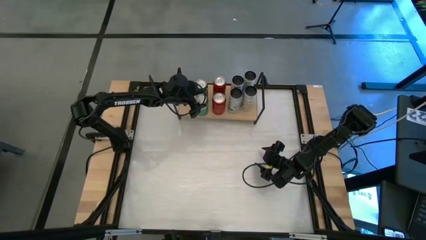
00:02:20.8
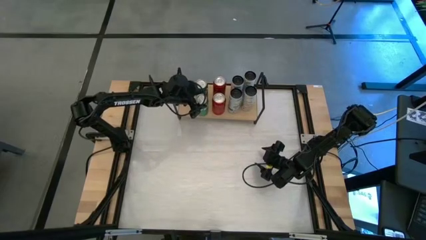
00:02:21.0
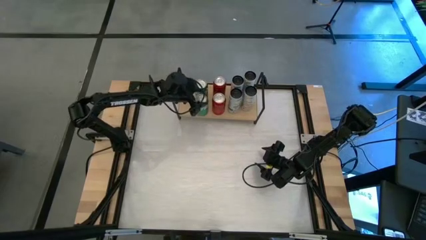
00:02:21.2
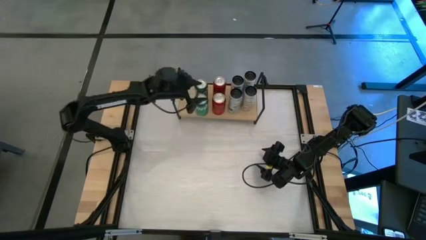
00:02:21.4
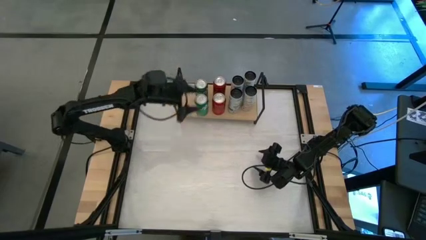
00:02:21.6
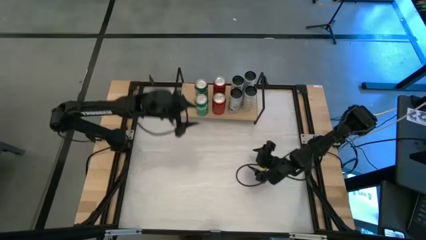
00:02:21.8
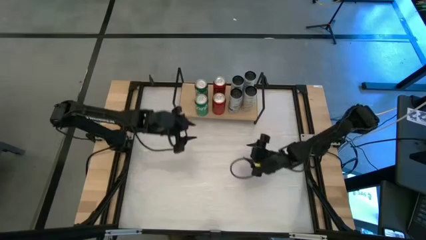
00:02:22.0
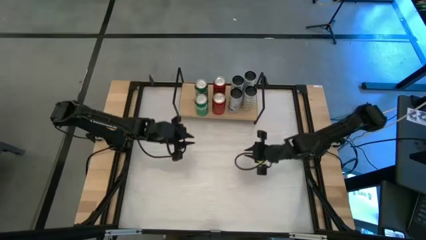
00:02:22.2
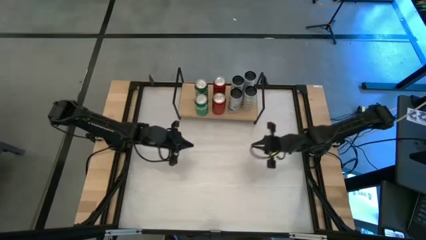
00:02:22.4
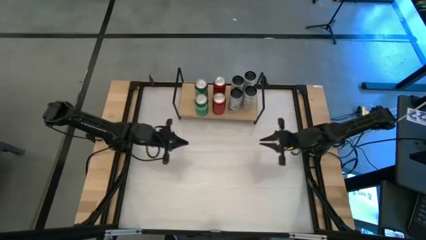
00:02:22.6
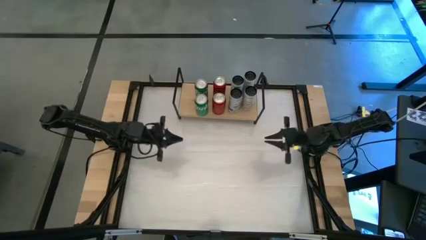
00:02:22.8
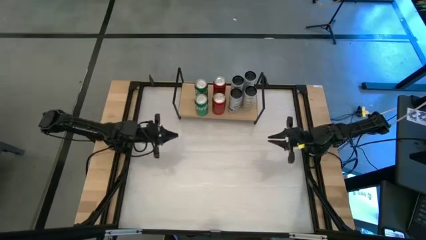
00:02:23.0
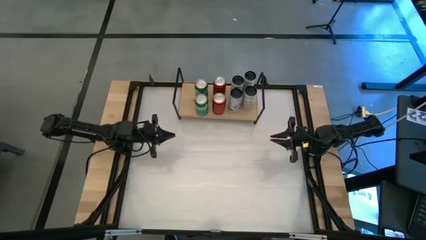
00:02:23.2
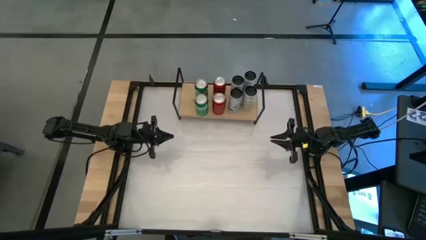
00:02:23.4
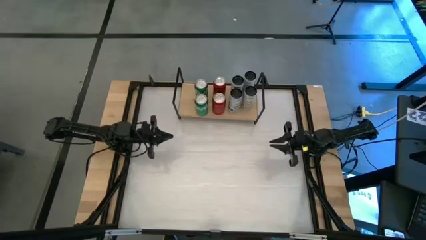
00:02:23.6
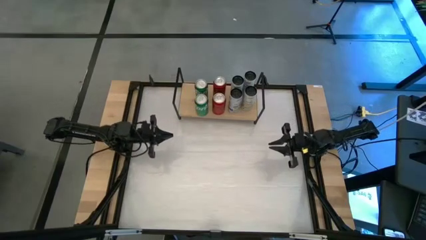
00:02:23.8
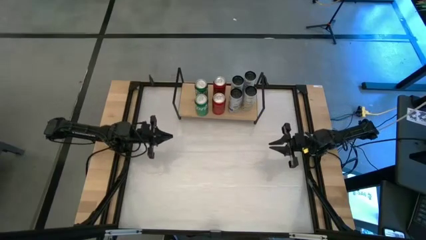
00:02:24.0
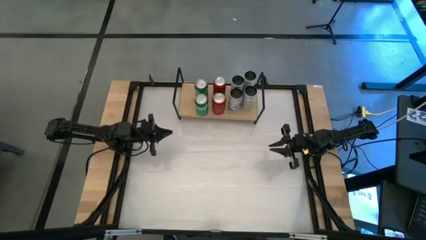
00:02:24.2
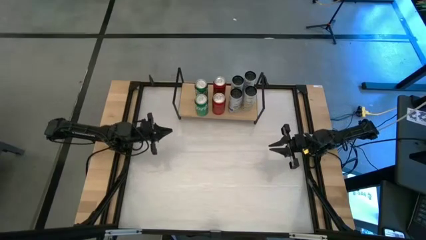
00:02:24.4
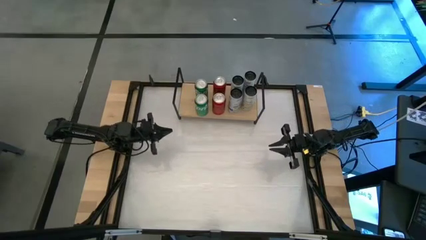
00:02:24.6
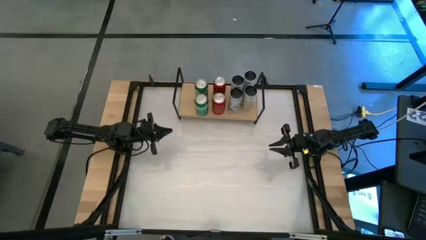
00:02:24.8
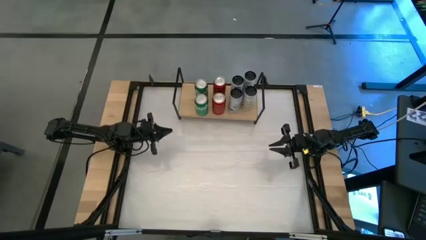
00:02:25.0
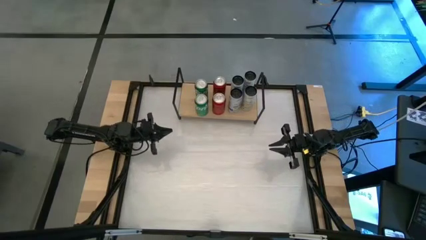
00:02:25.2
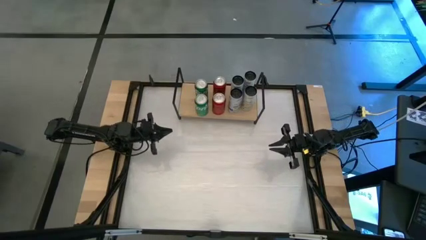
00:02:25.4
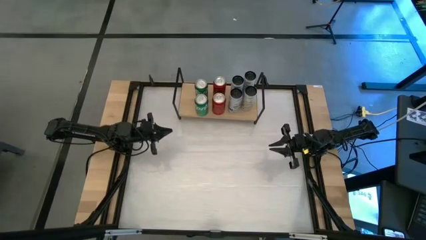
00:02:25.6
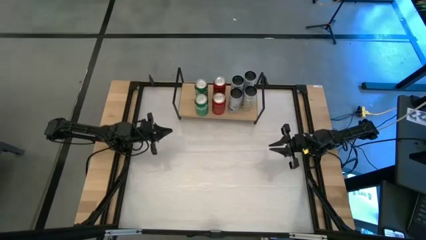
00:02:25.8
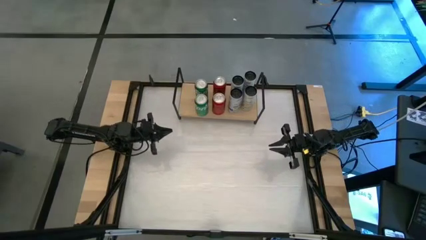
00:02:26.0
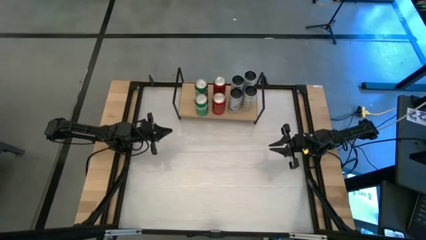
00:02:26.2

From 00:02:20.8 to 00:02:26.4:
Task: Place canned beverage on shelf
Return to Home Position

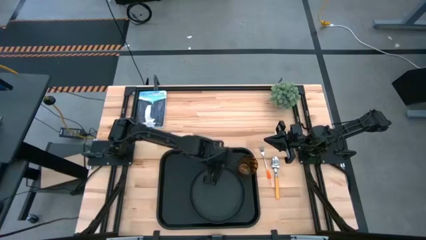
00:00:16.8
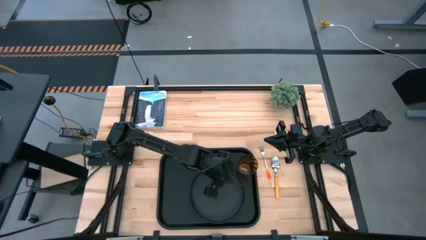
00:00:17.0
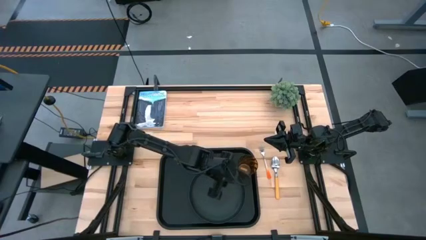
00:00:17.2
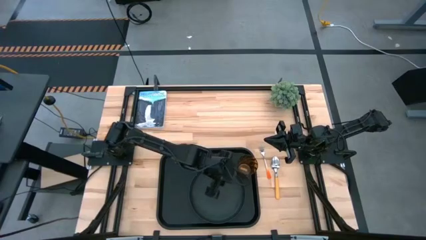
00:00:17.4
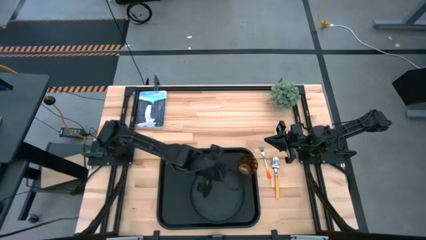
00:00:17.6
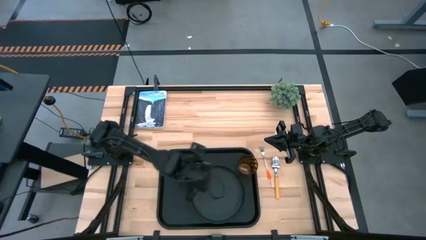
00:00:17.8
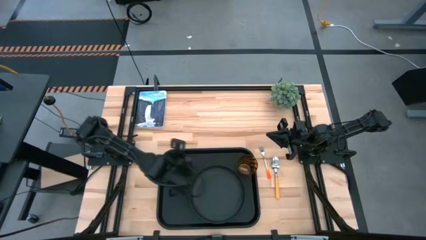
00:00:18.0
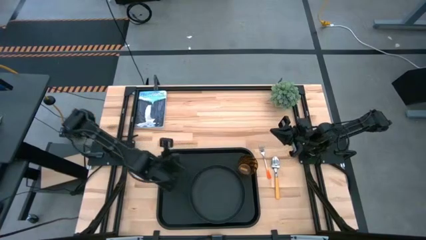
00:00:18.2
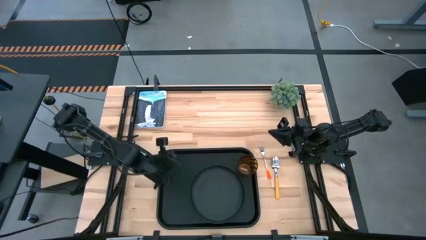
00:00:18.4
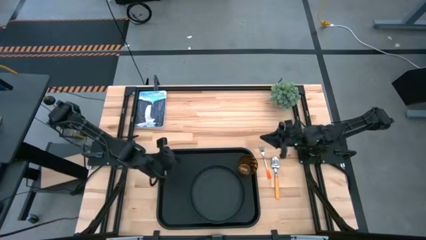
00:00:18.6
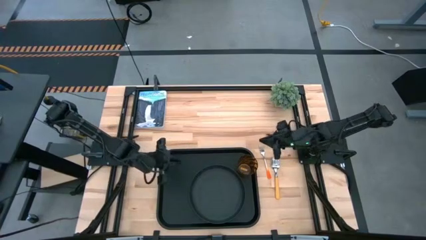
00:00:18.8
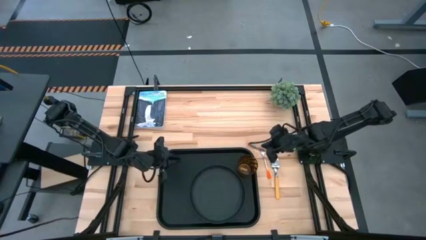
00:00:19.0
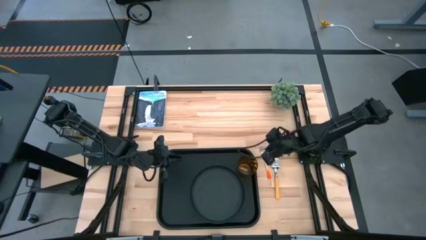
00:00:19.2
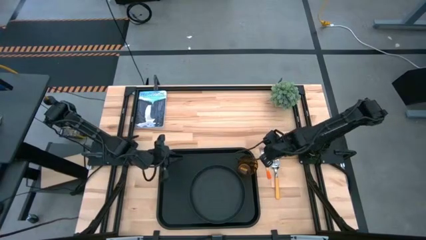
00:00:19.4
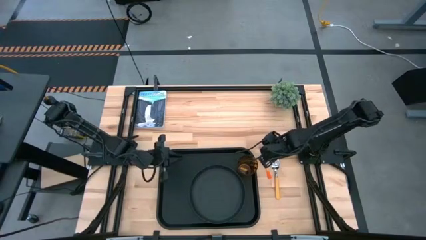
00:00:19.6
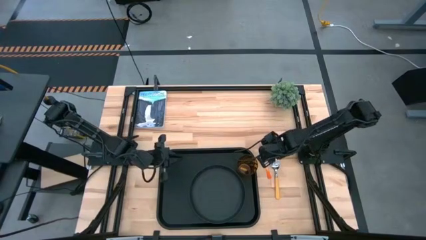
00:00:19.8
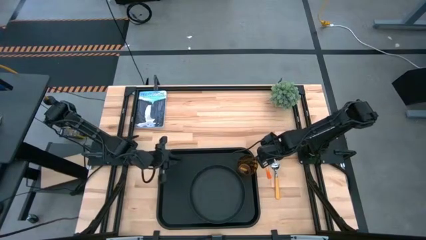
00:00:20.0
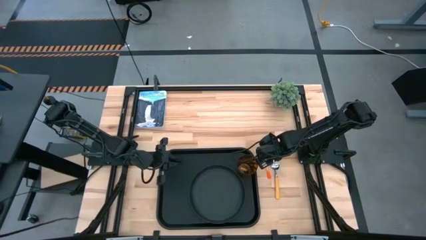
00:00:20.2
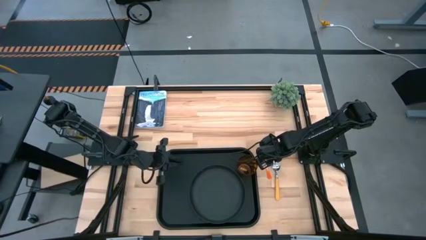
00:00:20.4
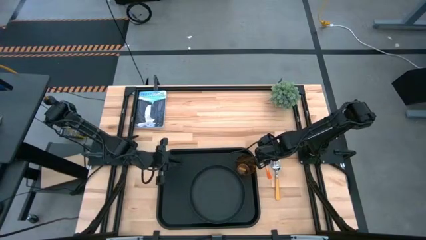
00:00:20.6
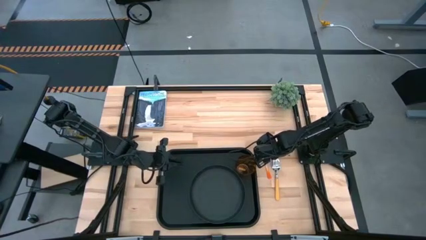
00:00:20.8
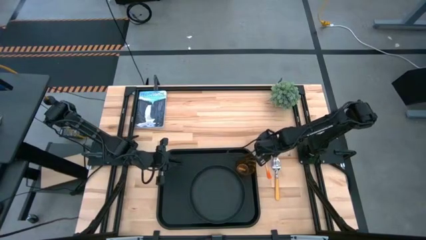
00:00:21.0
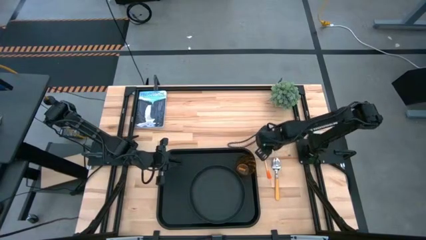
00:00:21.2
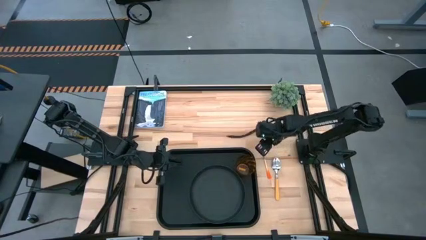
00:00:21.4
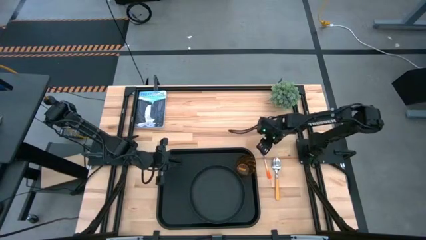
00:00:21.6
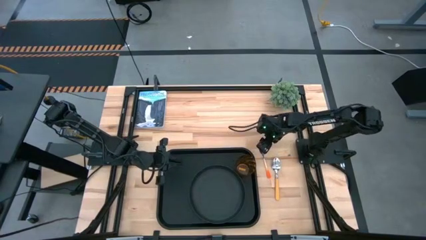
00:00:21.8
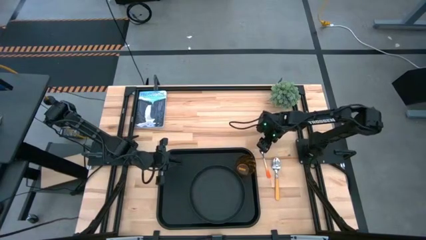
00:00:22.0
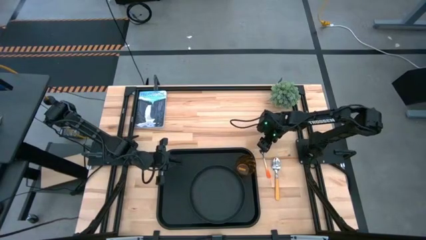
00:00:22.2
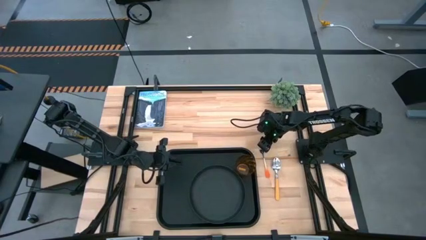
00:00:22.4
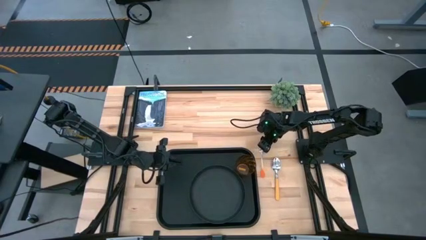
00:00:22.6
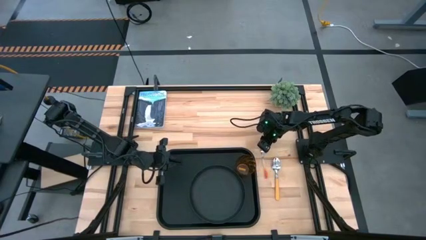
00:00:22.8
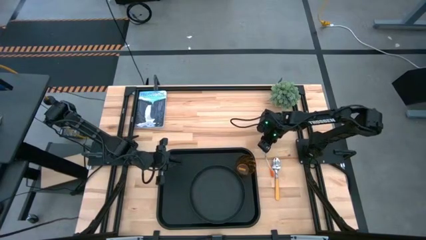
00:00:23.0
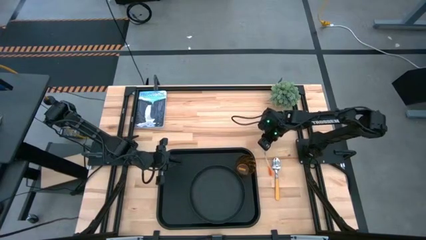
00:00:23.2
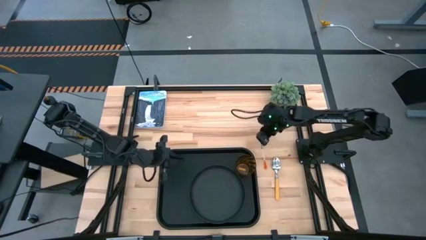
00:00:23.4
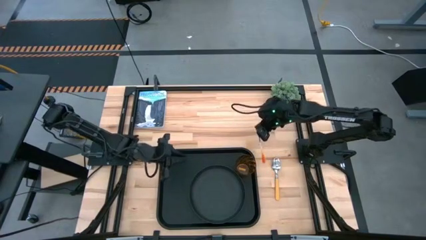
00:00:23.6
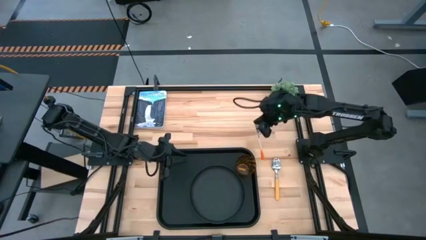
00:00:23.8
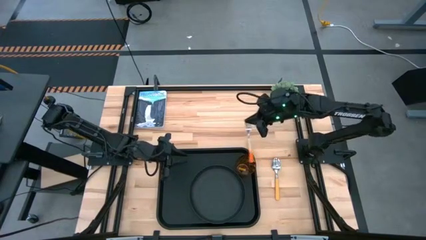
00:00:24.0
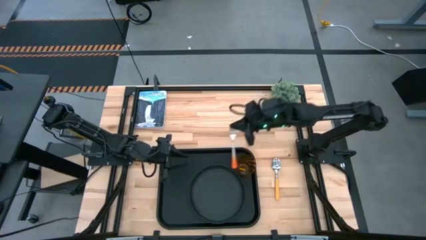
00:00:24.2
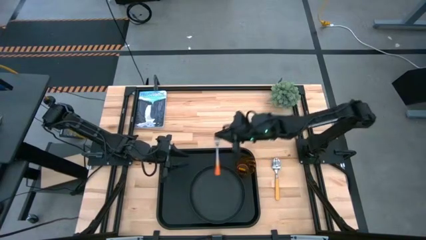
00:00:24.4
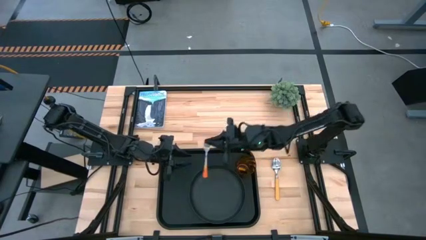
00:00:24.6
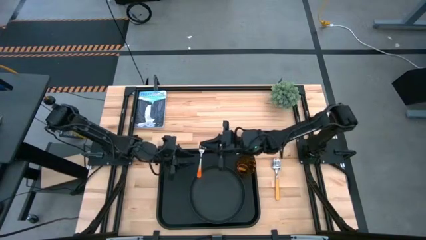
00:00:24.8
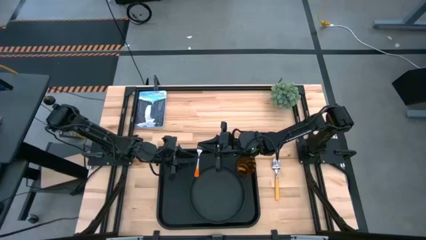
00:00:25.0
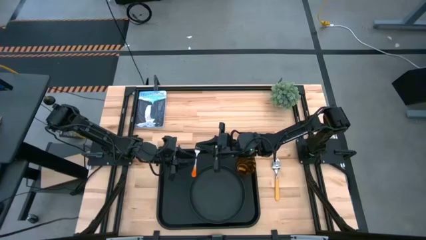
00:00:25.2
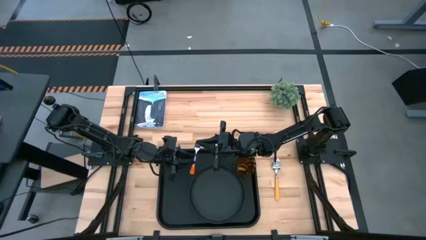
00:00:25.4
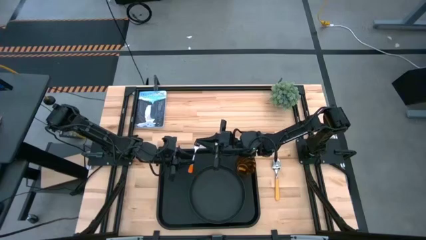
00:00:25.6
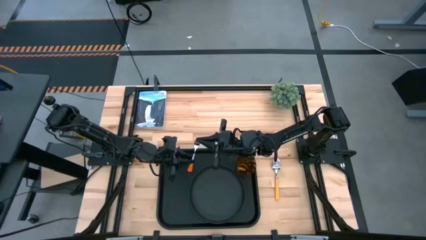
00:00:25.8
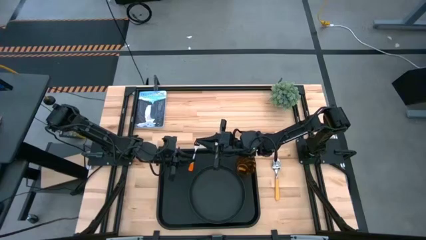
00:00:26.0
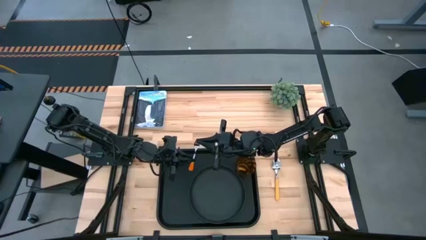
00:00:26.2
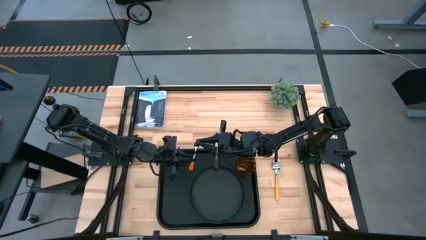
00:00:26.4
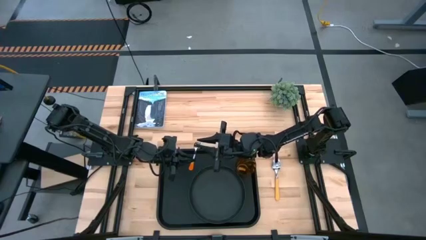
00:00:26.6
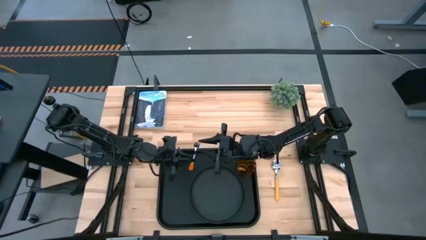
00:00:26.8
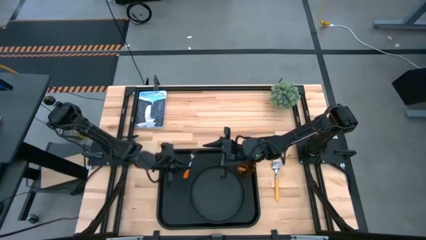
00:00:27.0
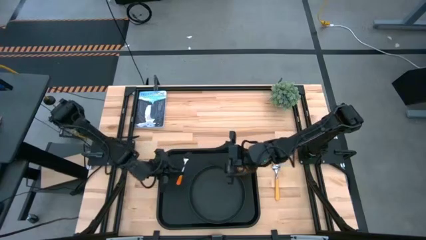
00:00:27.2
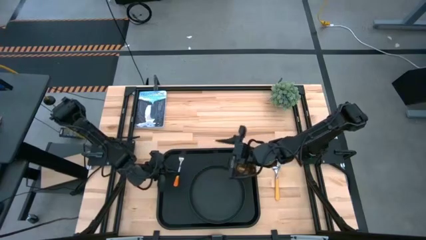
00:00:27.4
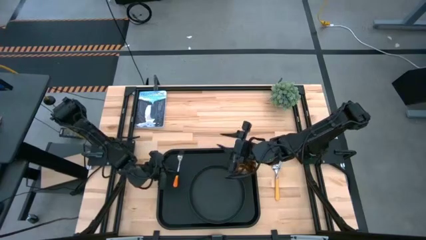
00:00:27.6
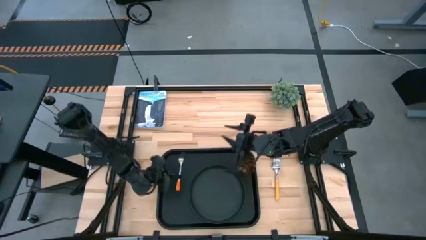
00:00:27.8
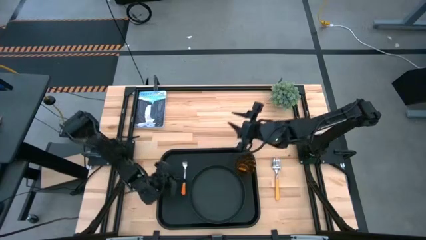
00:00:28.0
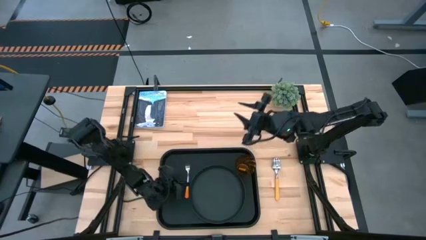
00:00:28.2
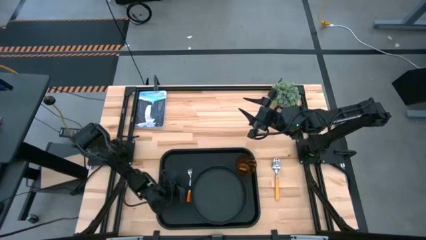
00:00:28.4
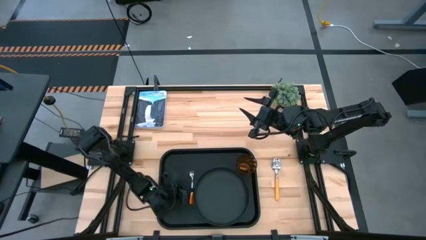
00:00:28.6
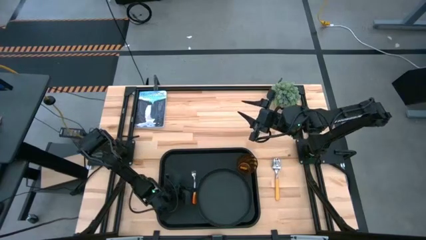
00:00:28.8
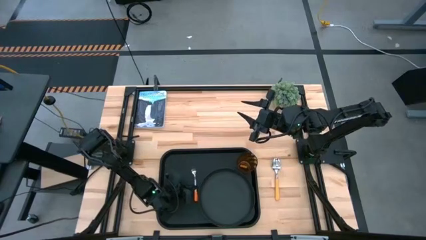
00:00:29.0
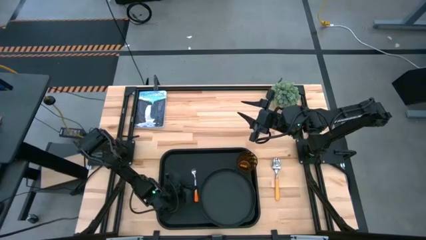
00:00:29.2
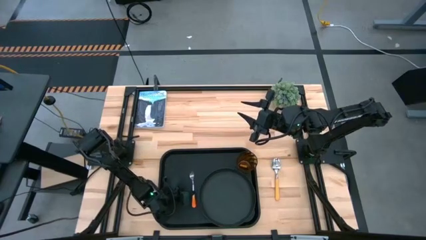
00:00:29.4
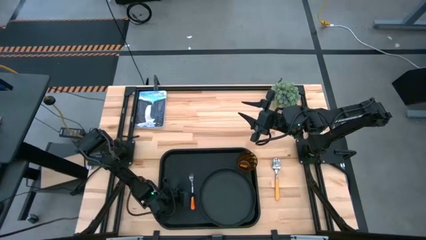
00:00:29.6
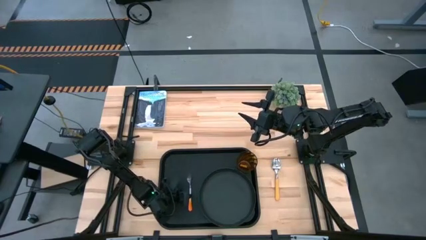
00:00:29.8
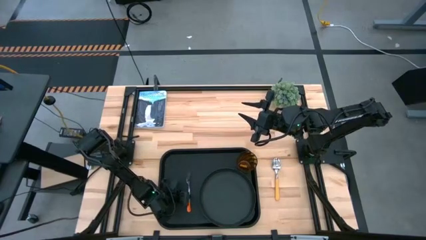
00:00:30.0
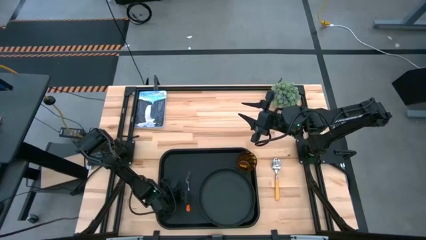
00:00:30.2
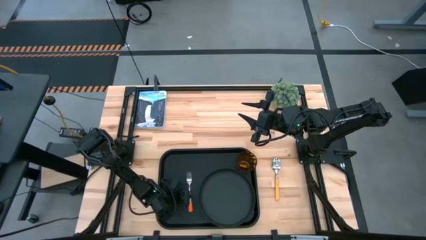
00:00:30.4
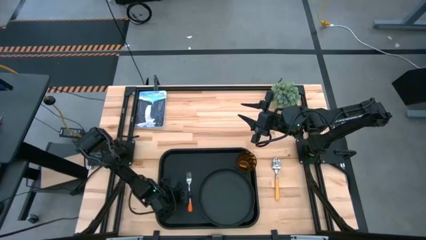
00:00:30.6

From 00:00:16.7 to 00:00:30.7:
Task: Pick and place plate/cup/fork/spoon on tray
Put the orange fork on the black serving tray to the left of the black plate
